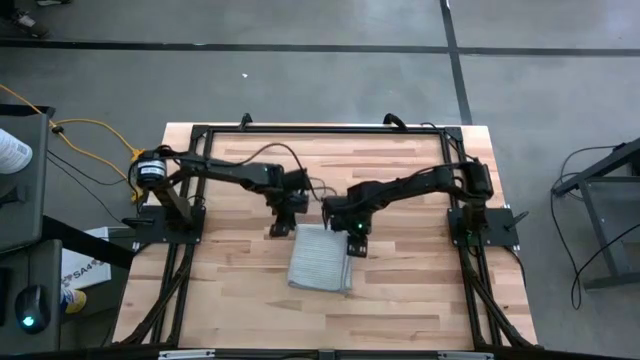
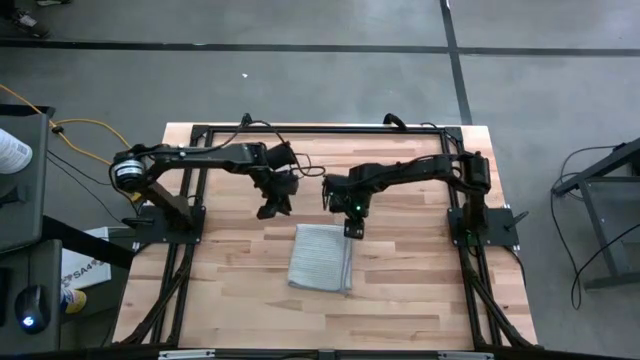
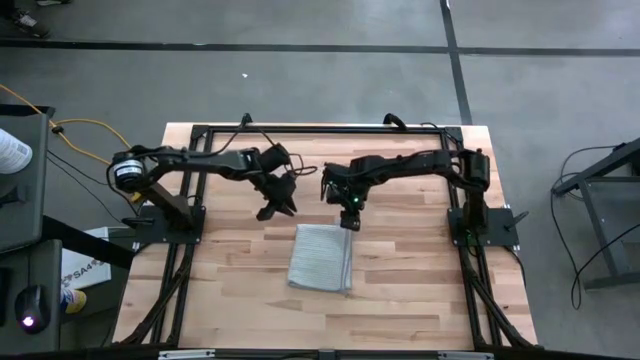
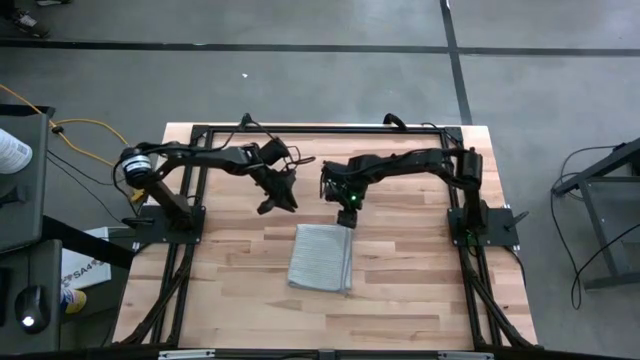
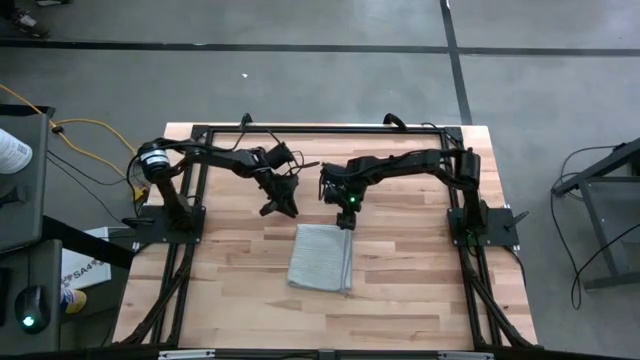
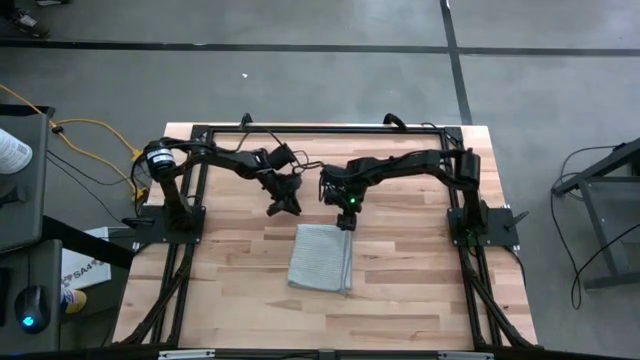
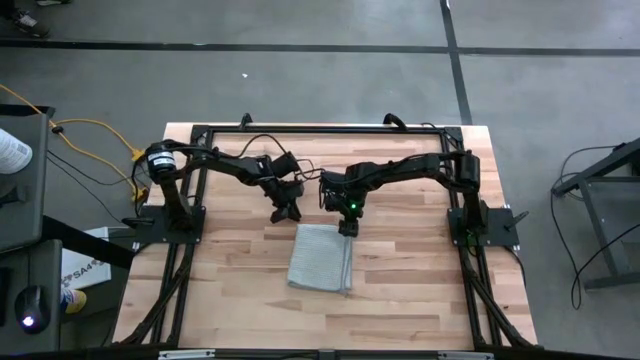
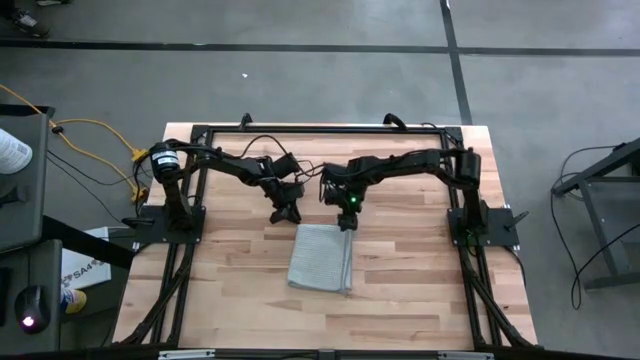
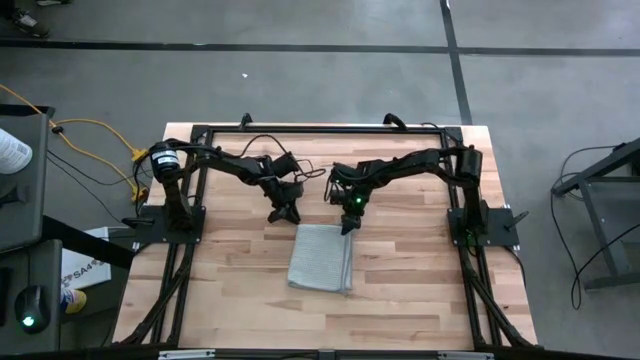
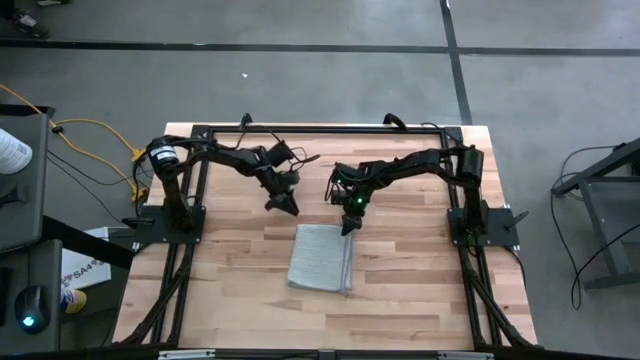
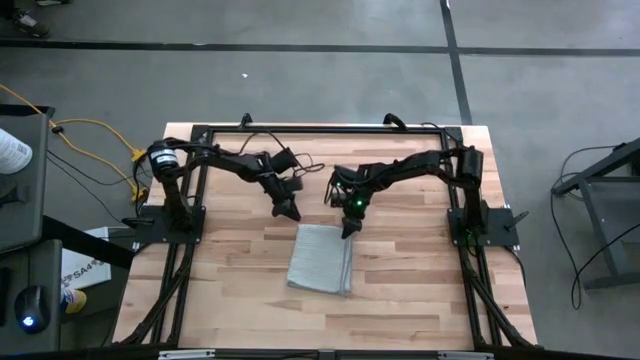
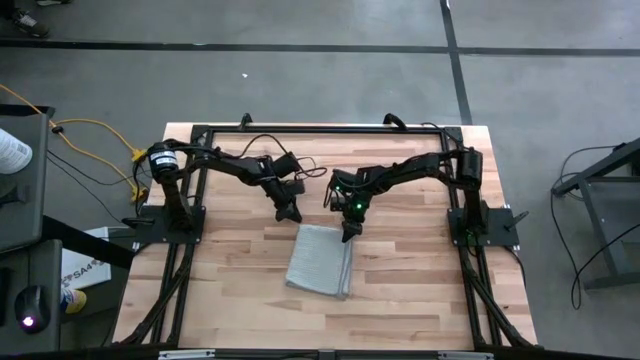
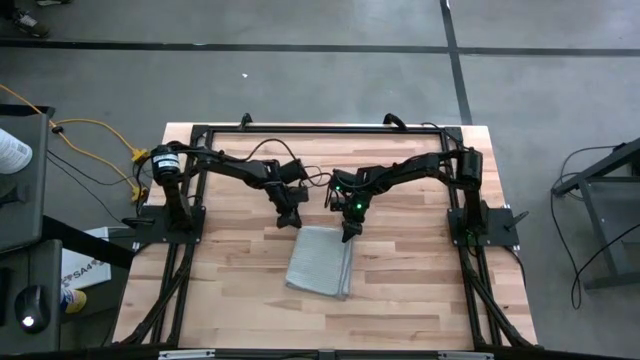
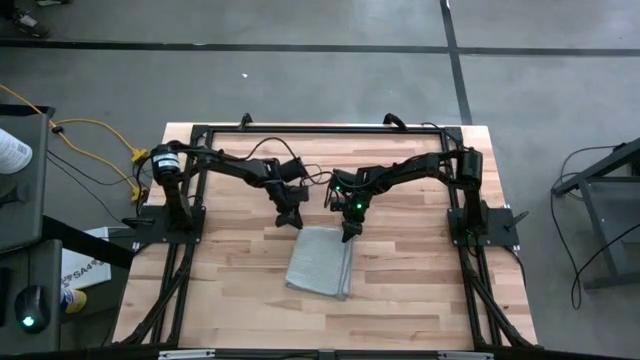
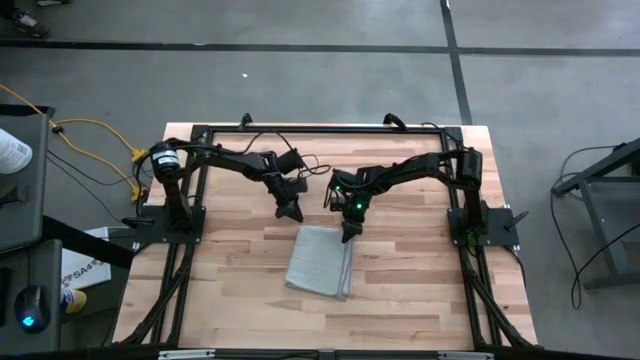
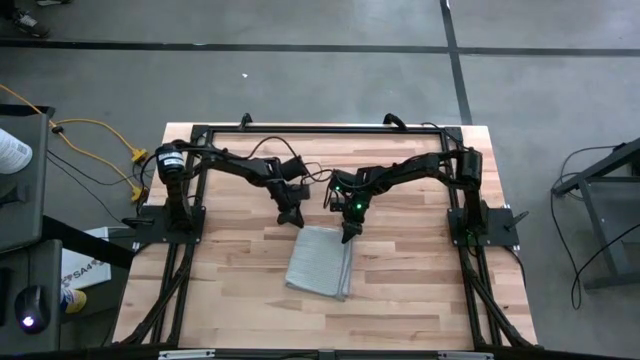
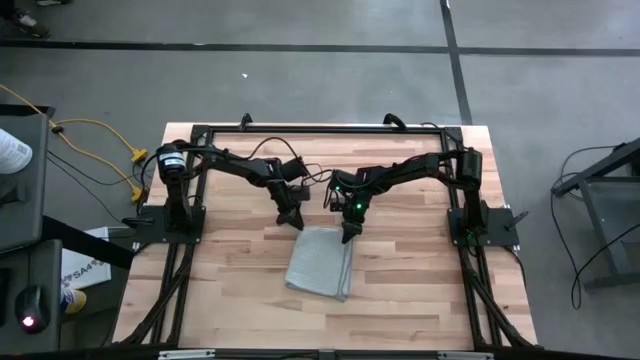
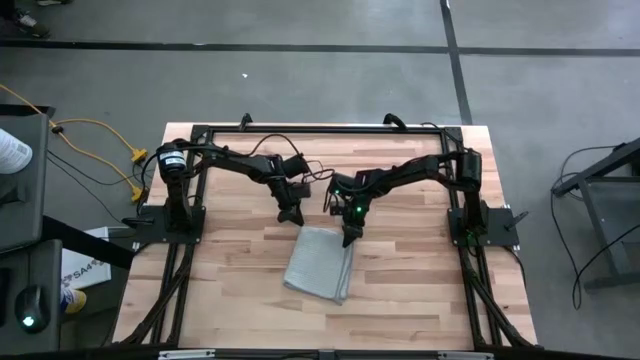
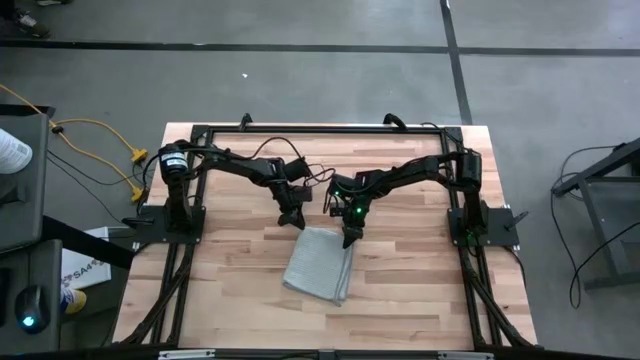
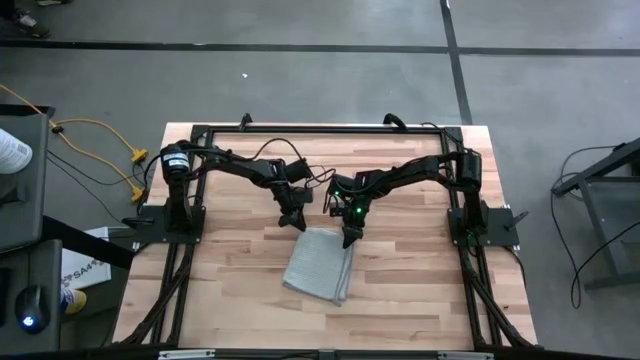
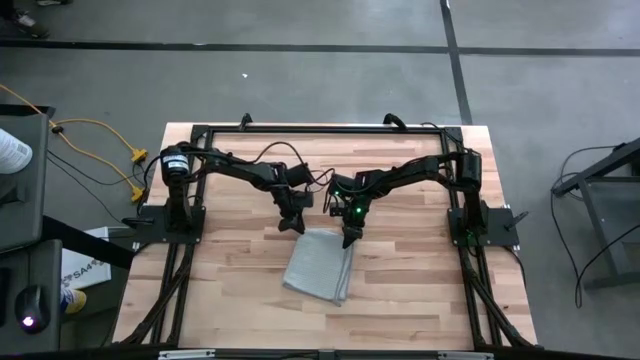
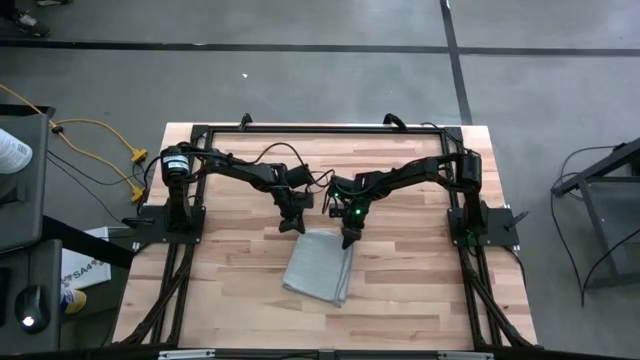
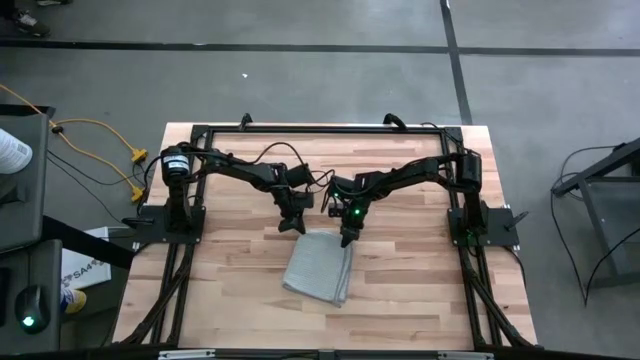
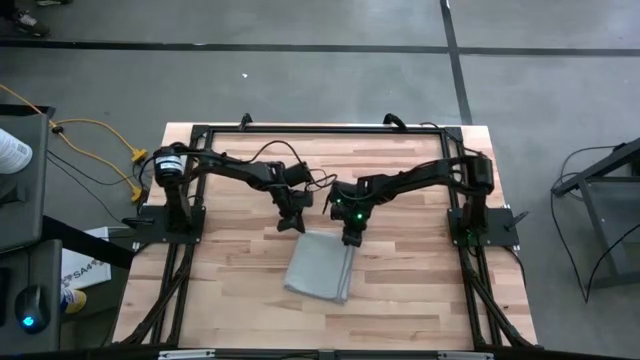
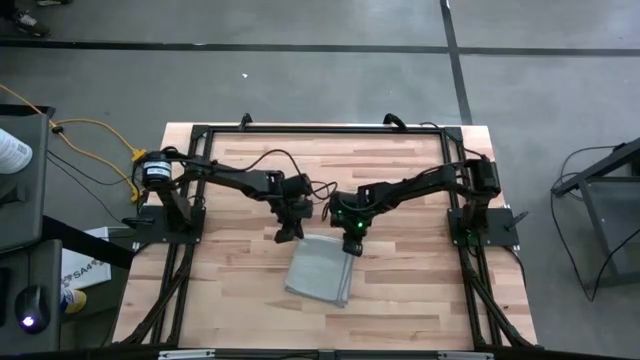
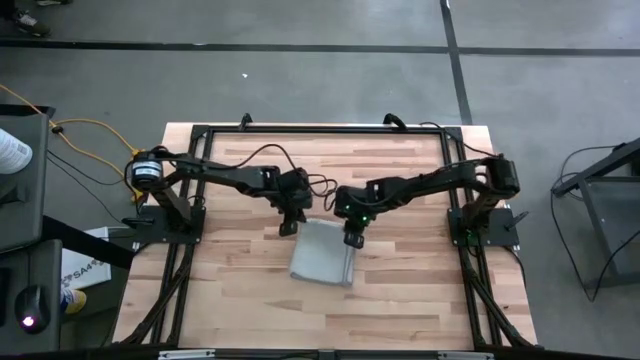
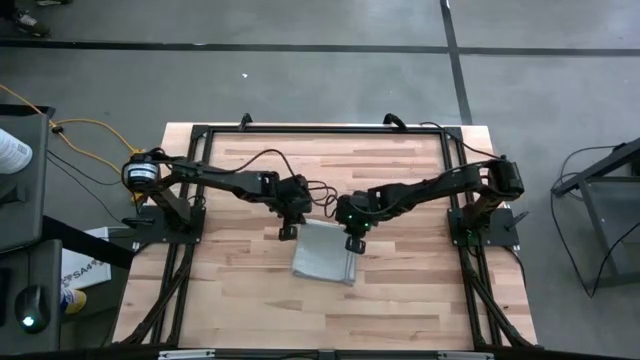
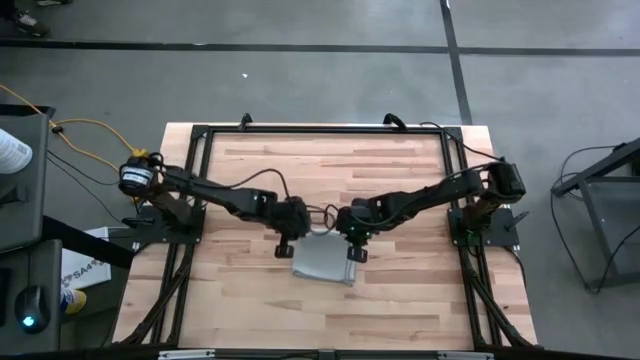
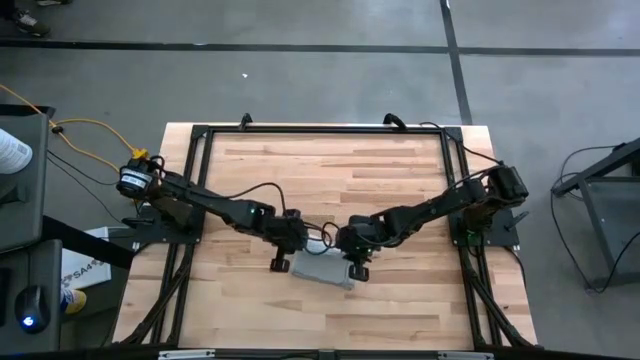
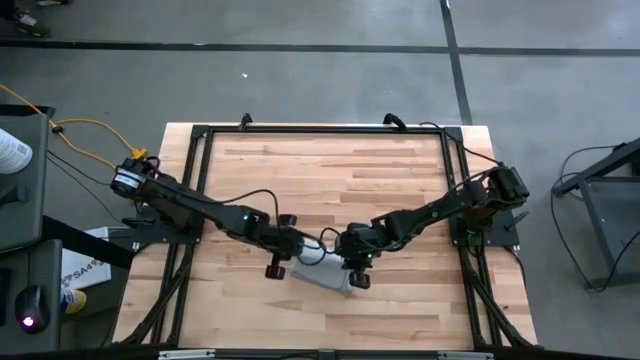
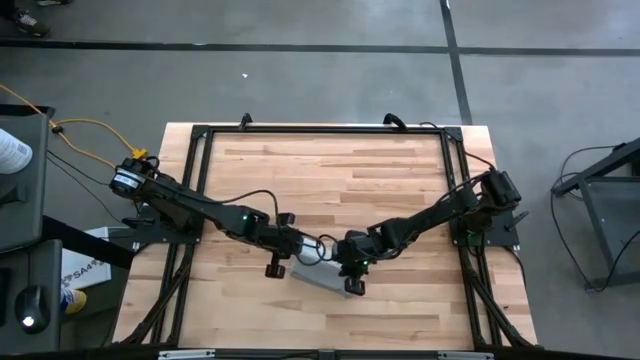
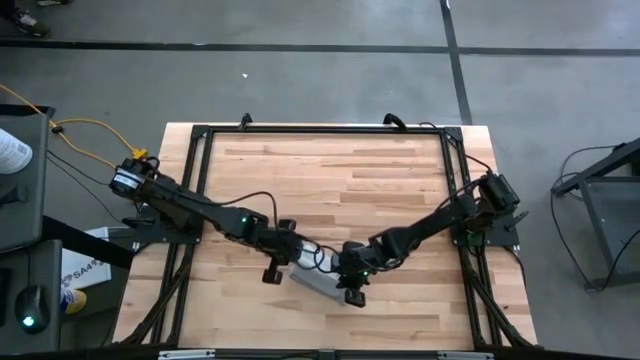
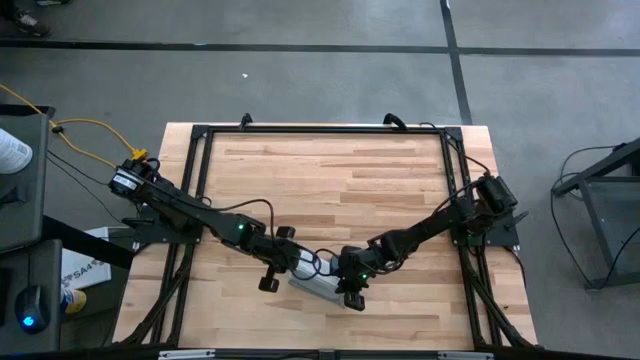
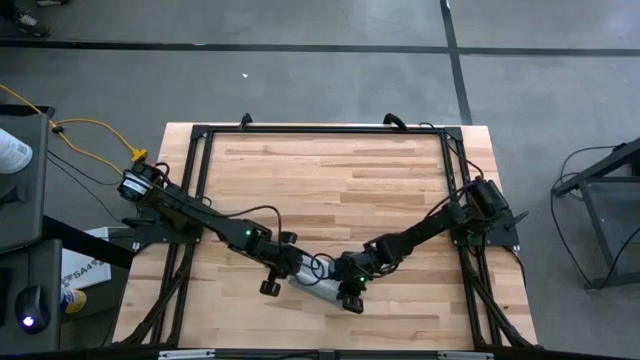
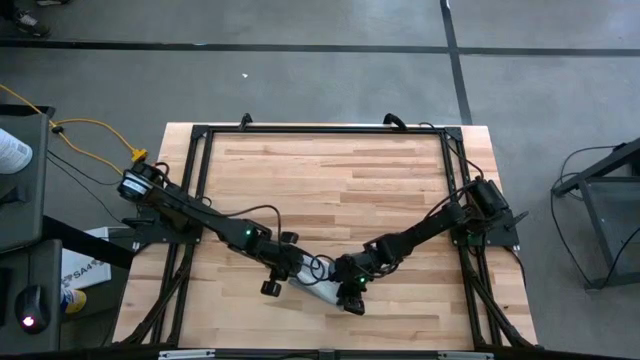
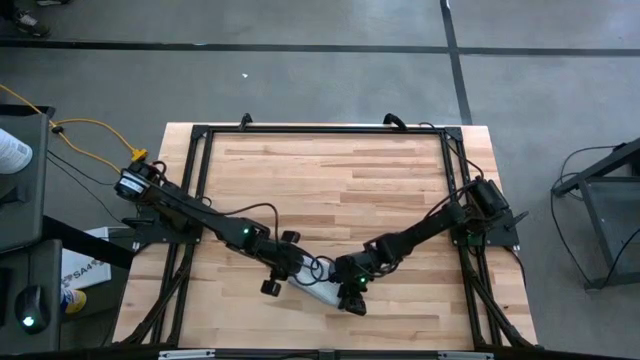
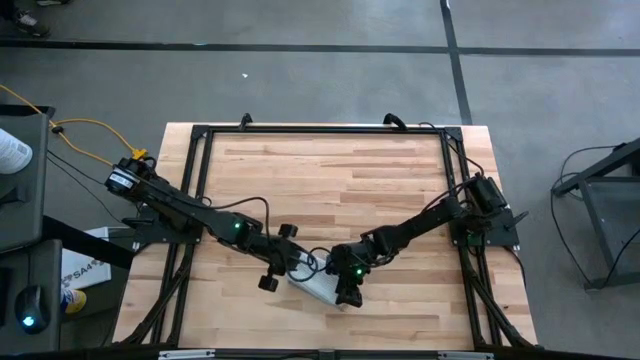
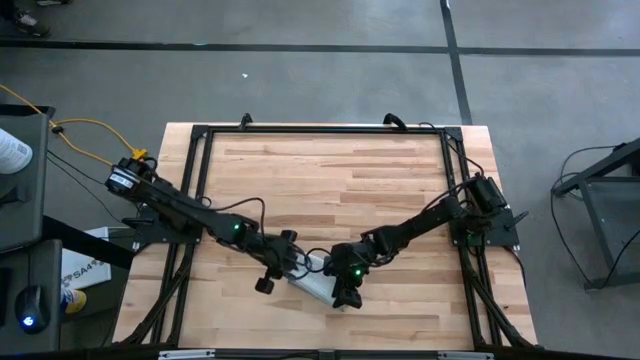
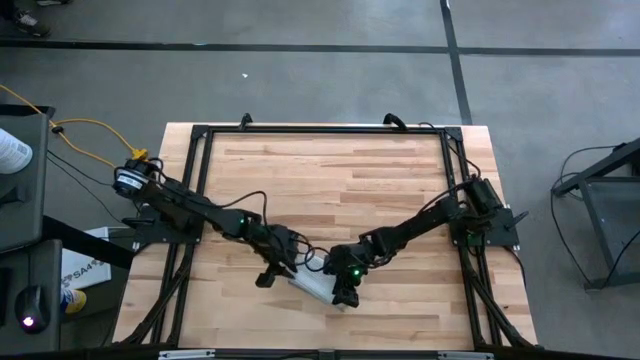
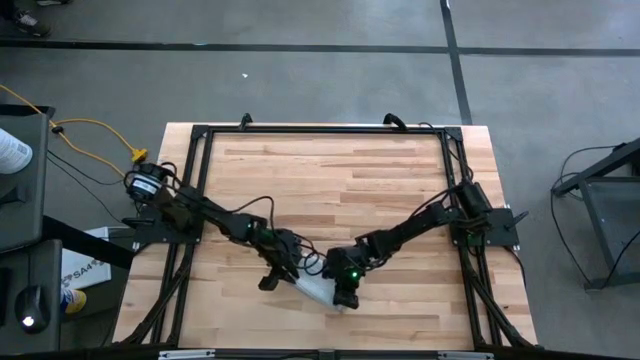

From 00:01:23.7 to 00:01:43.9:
Task: Fold microfiber towels
Fold the gray towel
